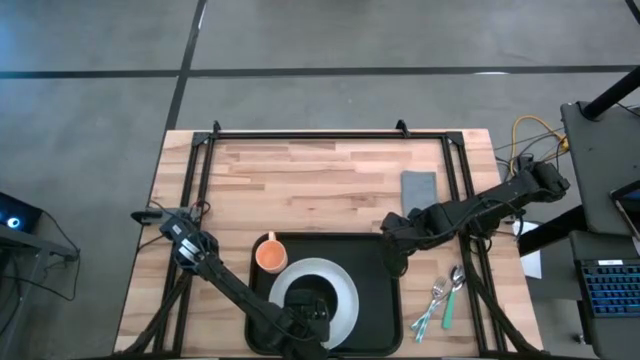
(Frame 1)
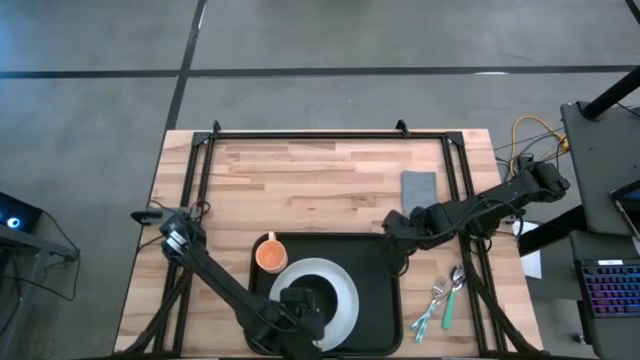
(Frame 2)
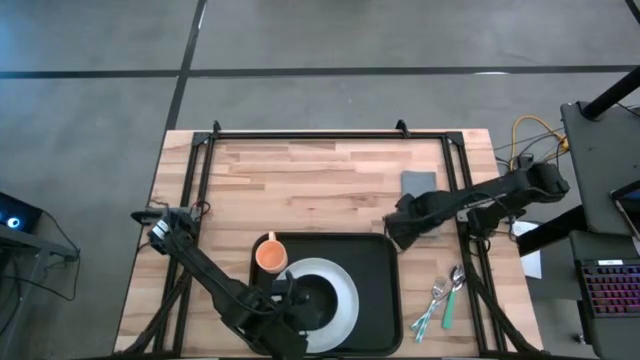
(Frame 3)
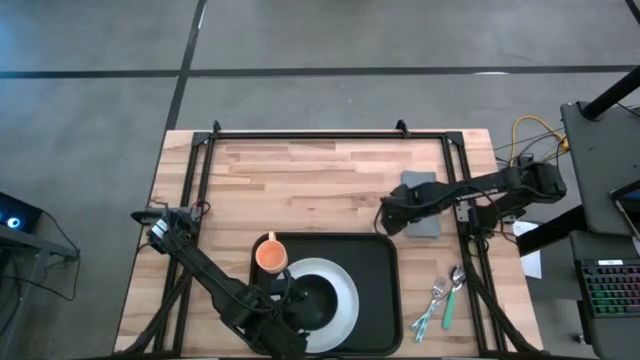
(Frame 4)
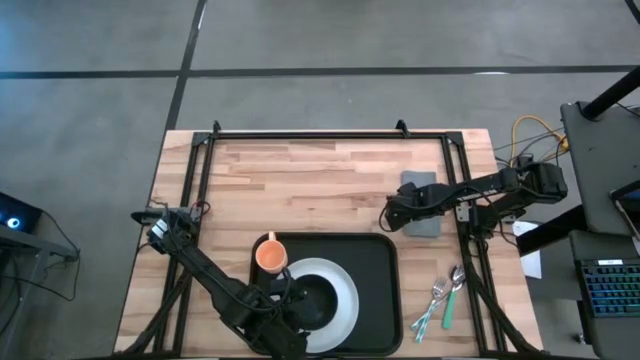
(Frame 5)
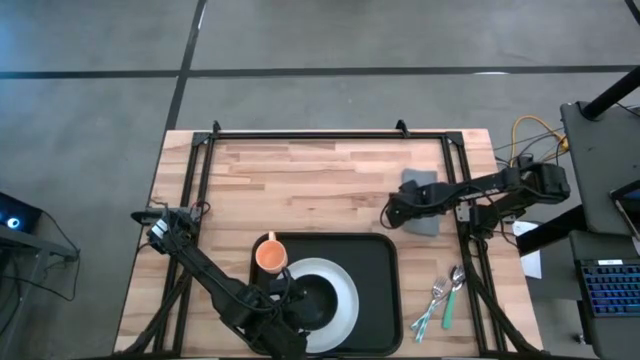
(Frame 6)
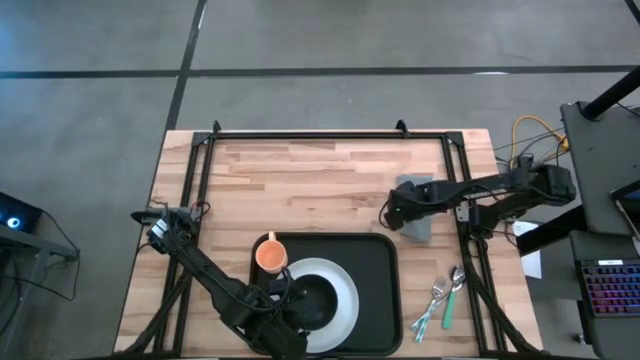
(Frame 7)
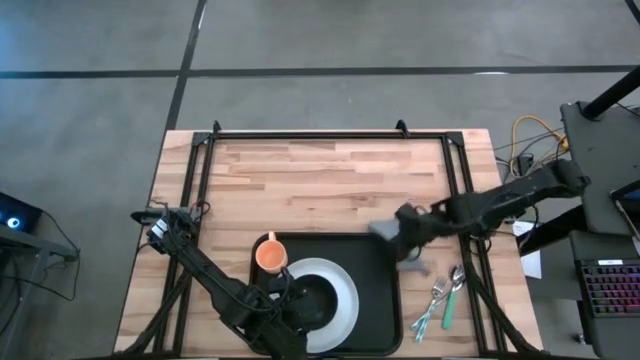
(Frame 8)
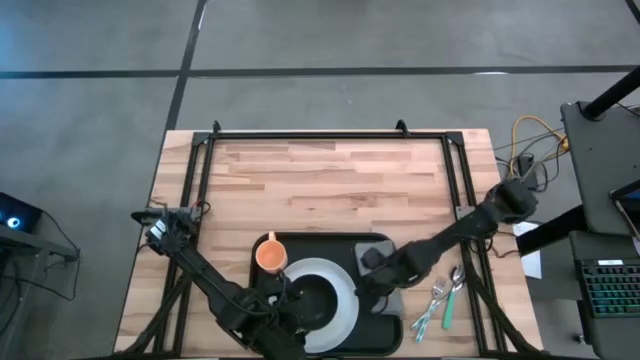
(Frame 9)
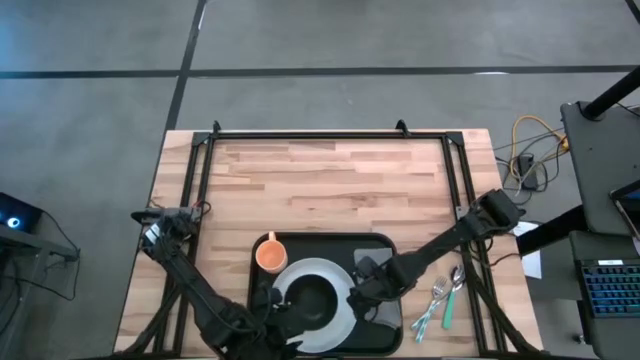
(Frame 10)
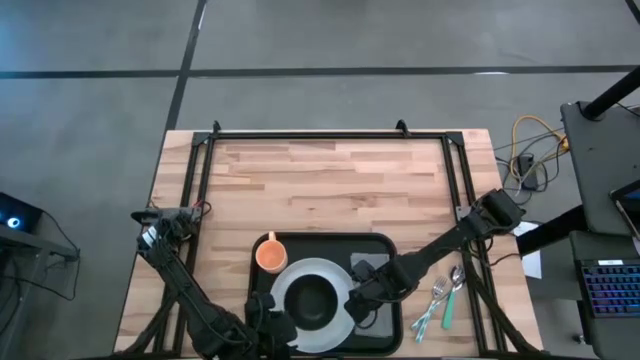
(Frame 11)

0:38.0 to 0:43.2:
Task: Set up tray
Put the gray napkin on the black tray at the right of the white plate

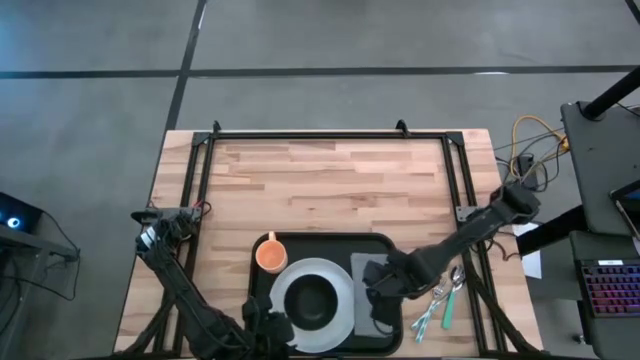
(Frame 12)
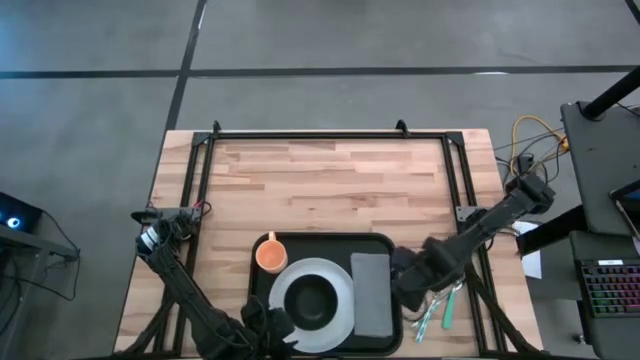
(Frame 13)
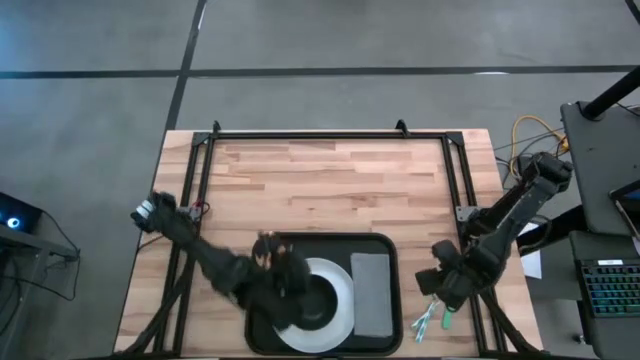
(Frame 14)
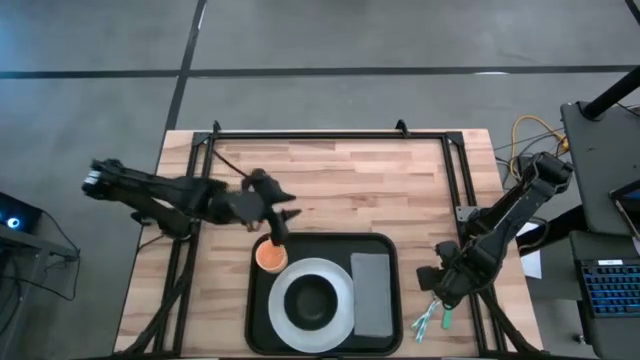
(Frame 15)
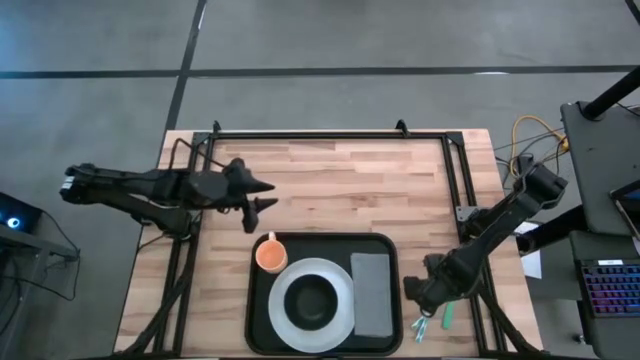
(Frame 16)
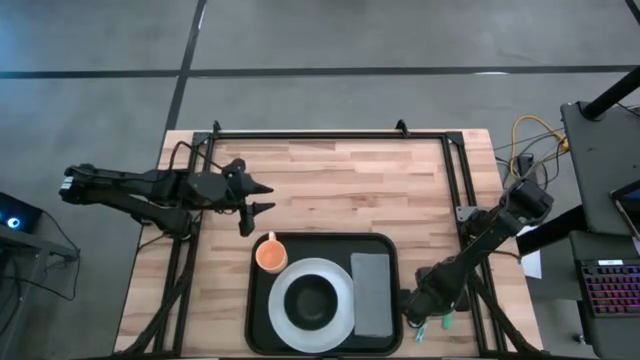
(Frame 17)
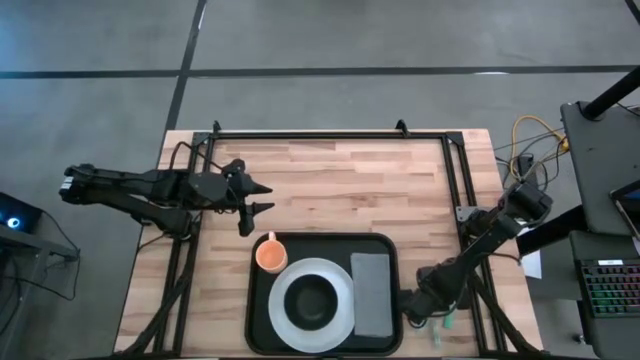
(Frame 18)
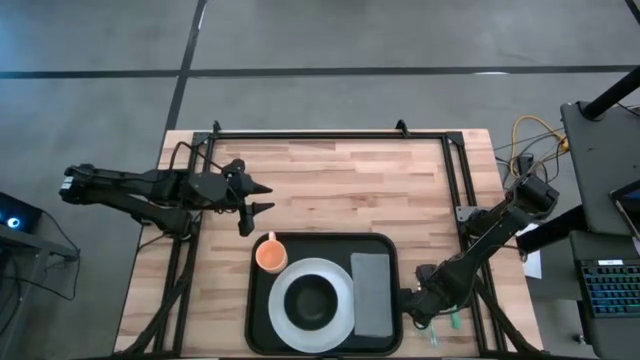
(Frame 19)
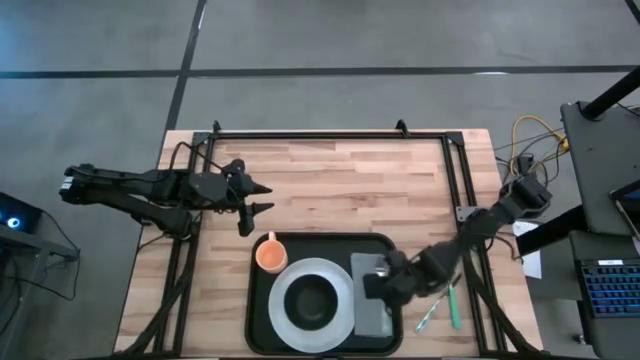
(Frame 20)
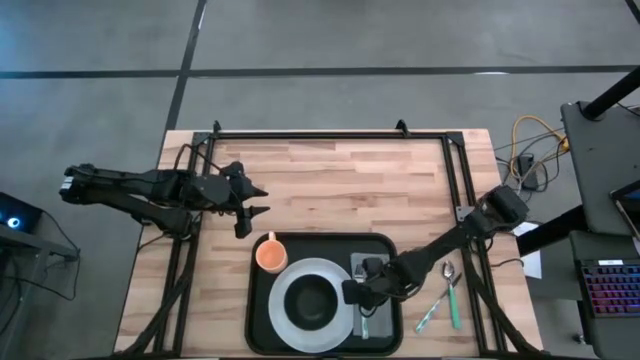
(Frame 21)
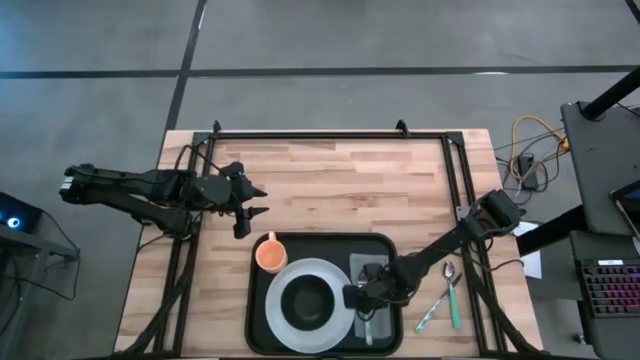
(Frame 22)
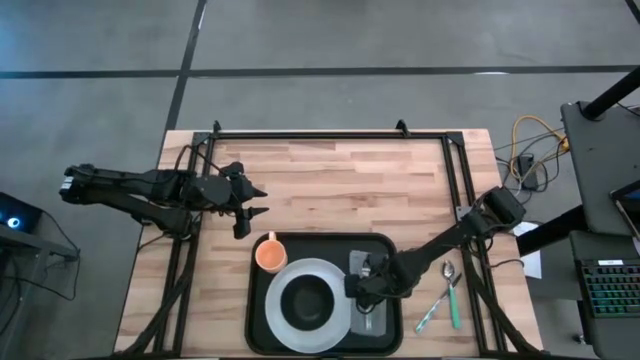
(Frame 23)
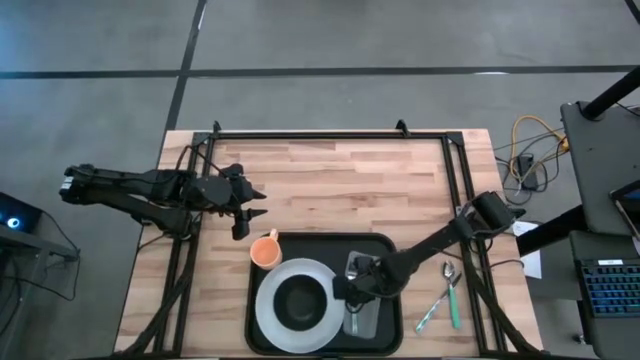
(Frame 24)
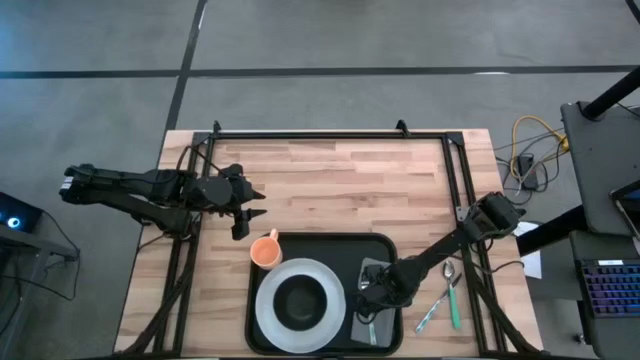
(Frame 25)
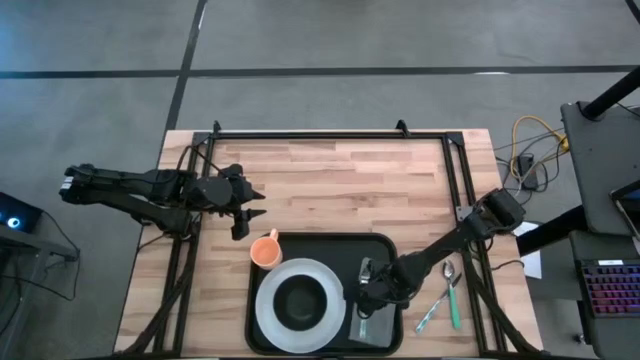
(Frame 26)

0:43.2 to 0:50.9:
Put the blue fork on the gray napkin

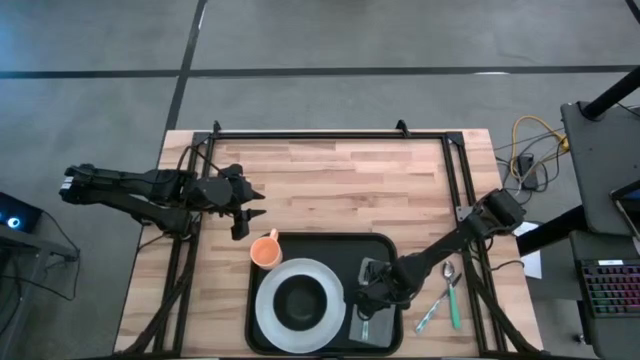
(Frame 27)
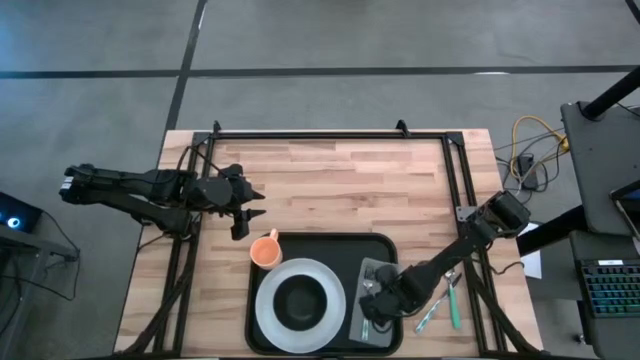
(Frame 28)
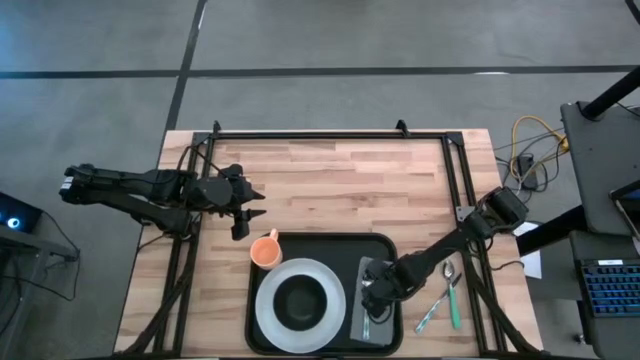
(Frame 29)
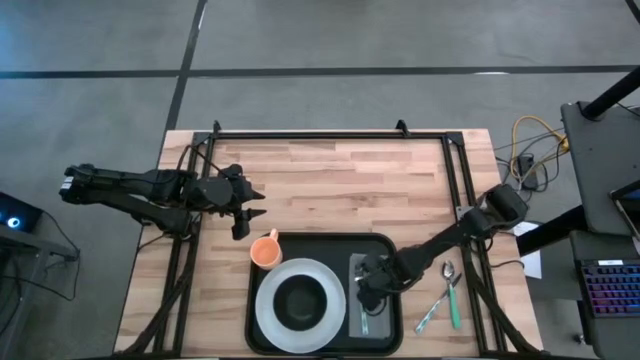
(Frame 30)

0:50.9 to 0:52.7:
Adjust the gray napkin on the black tray

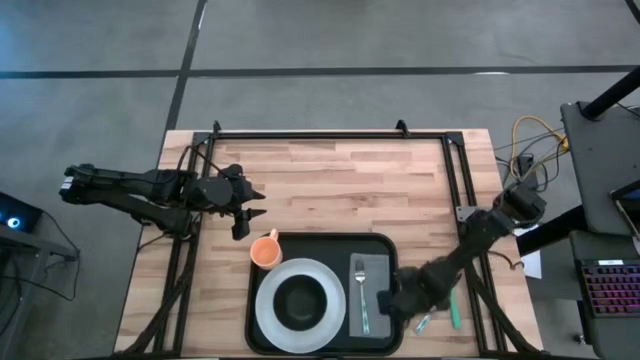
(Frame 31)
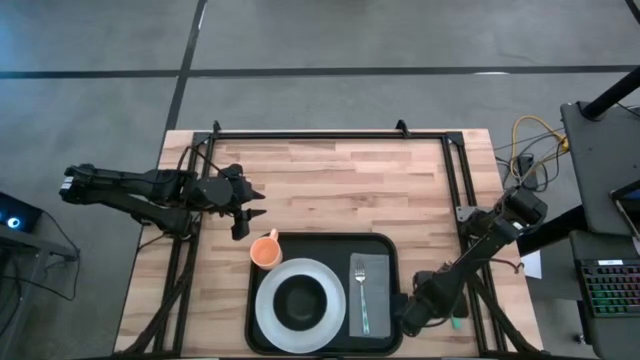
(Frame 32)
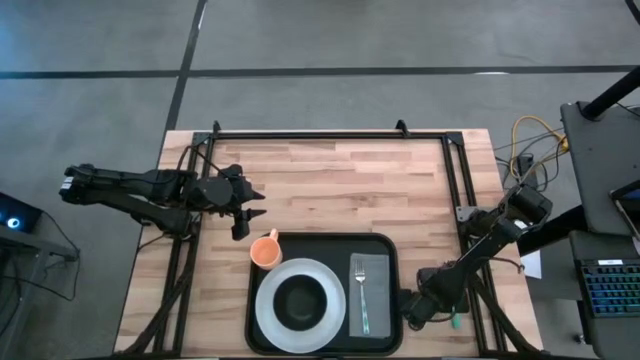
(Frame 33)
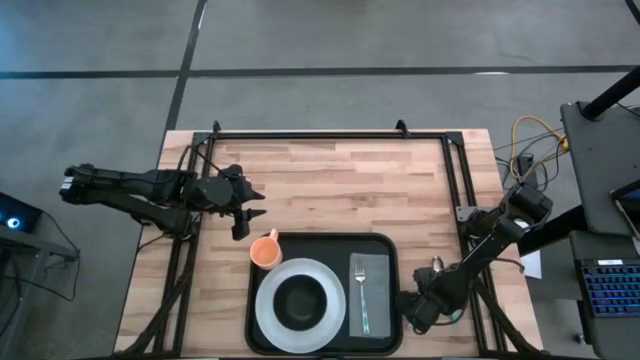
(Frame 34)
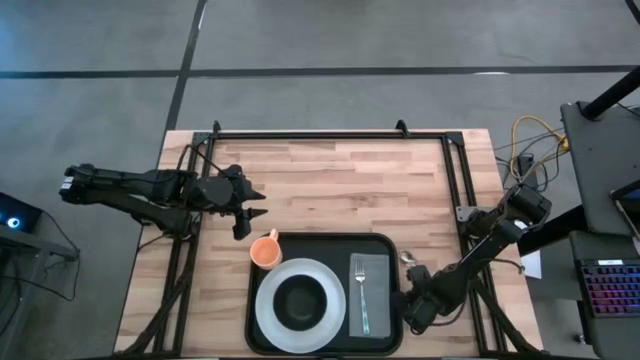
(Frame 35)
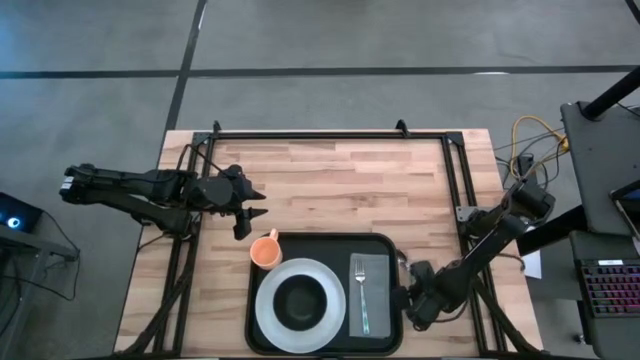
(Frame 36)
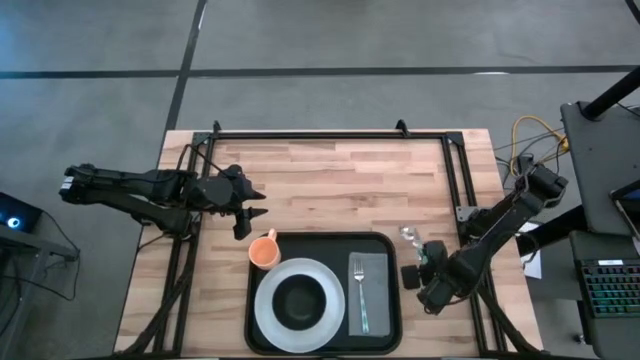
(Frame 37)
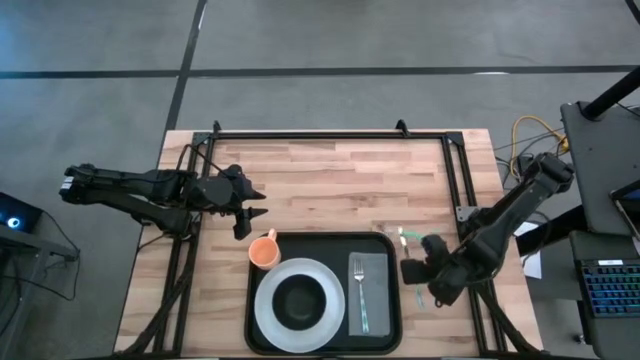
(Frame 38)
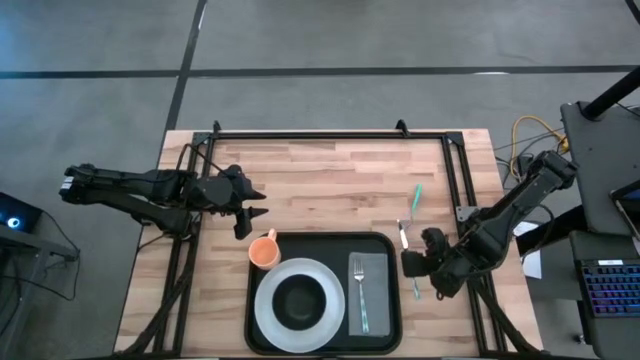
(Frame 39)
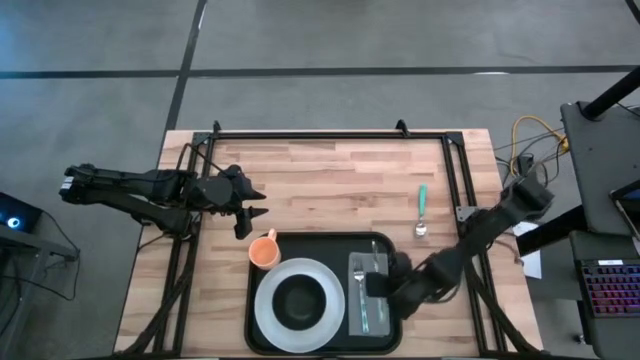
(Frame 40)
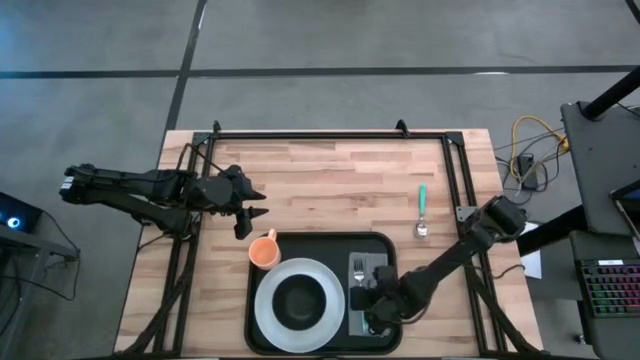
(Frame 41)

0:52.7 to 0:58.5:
Put the blue knife on the napkin to the right of the blue fork

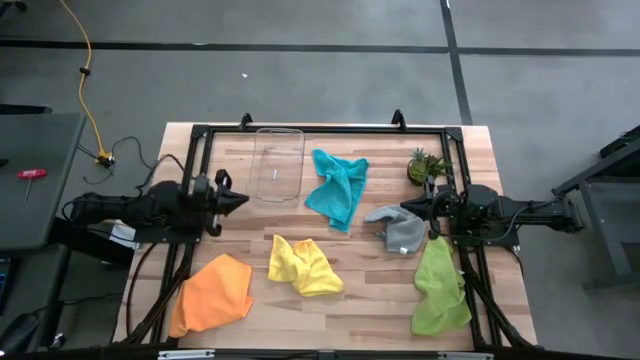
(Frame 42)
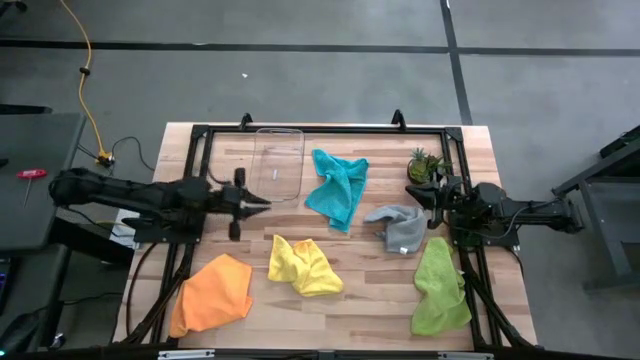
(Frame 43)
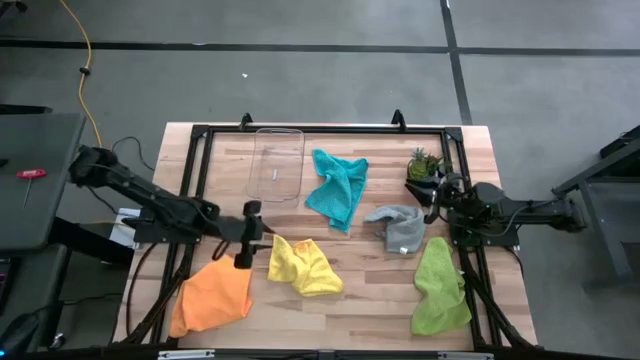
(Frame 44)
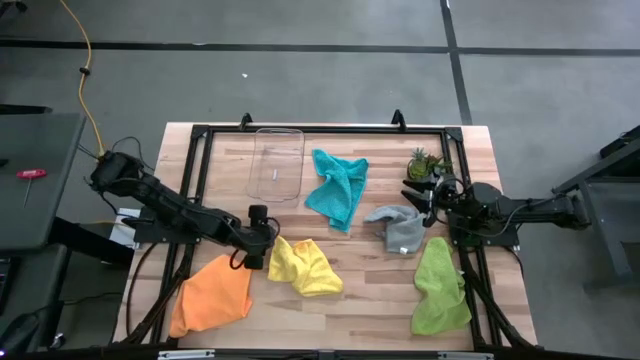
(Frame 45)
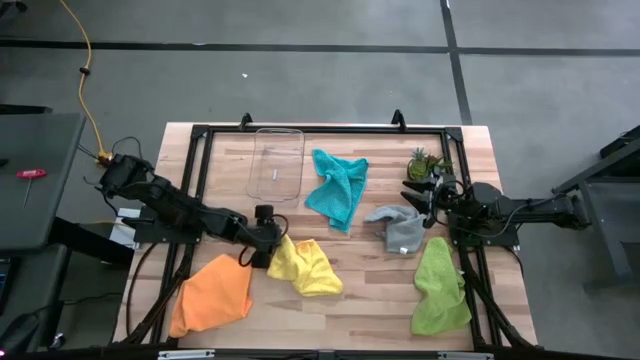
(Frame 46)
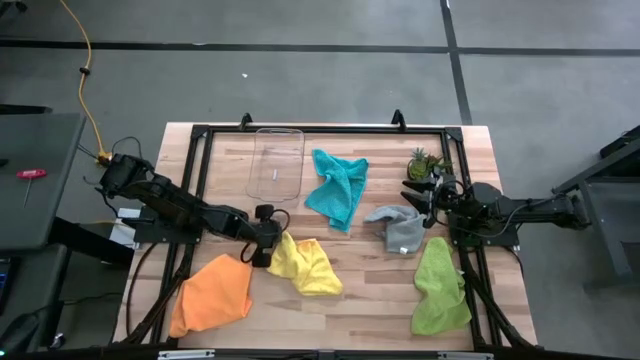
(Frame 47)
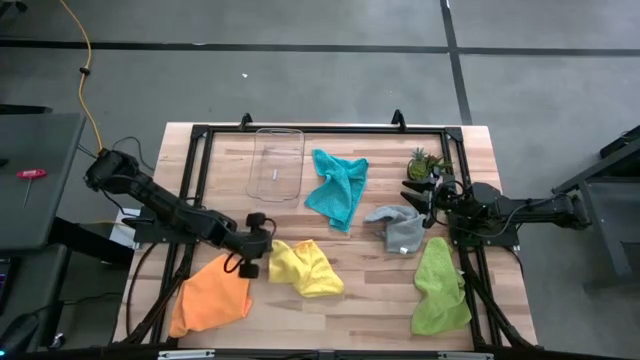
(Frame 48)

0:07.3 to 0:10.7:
Task: Fold microfiber towels
Fold the yellow microfiber cloth
